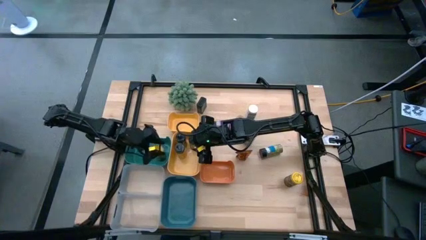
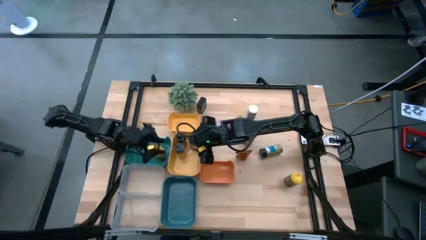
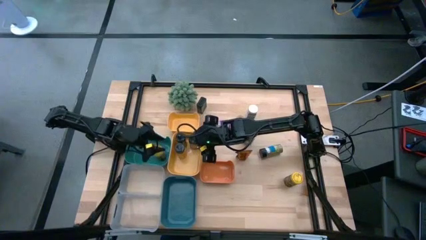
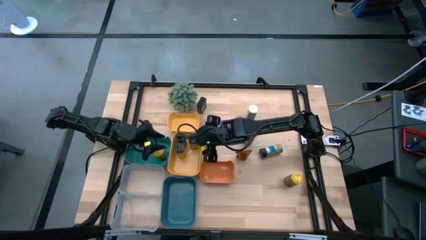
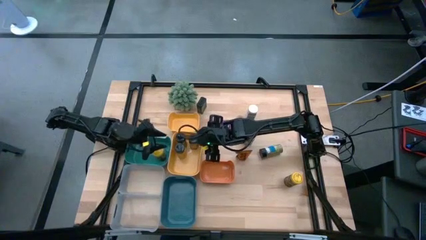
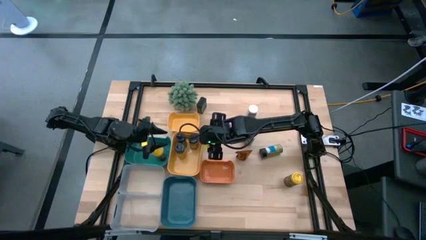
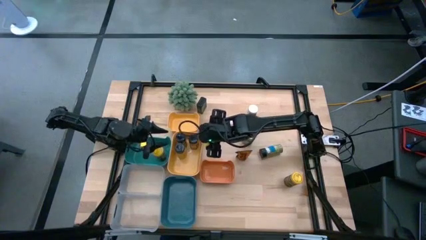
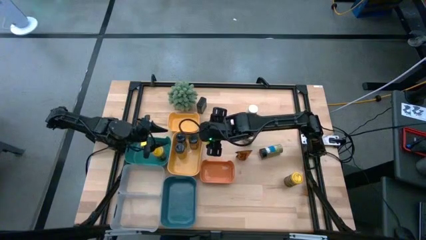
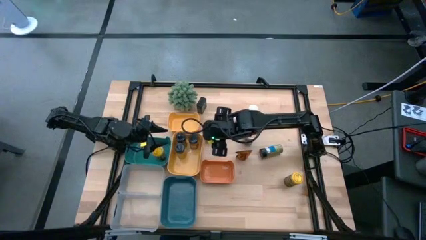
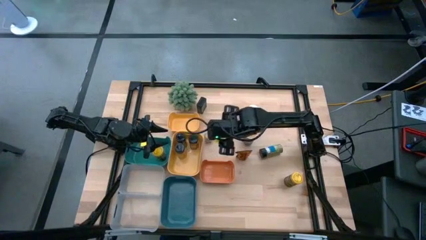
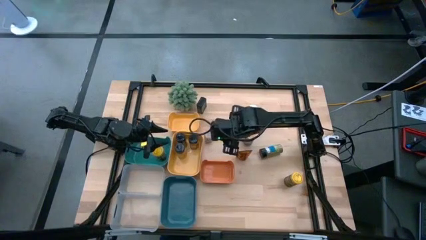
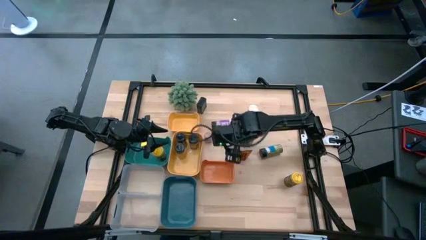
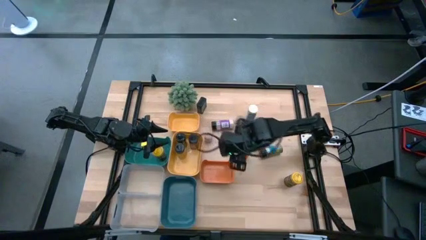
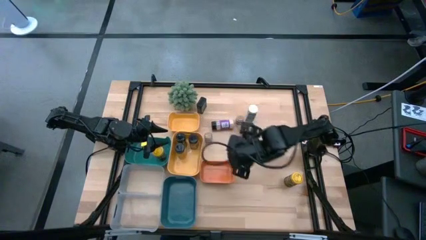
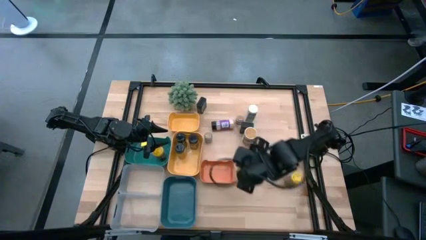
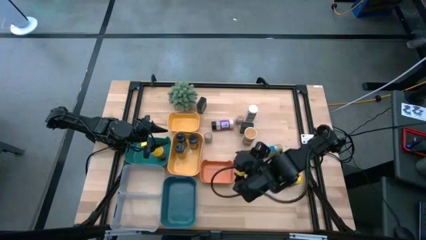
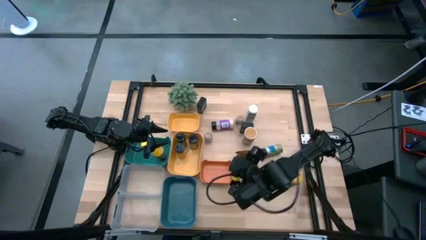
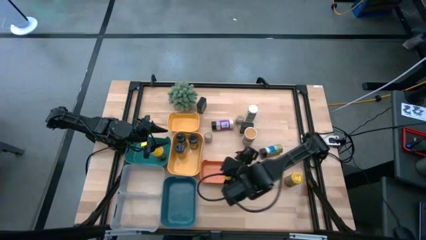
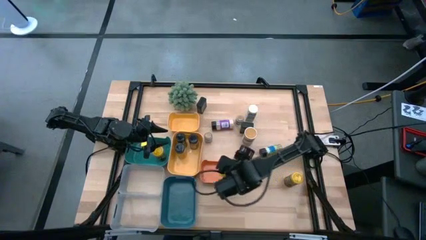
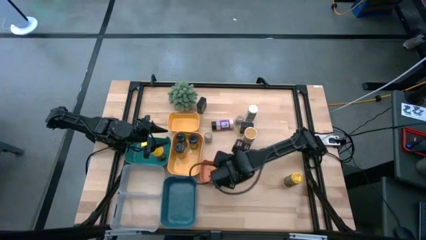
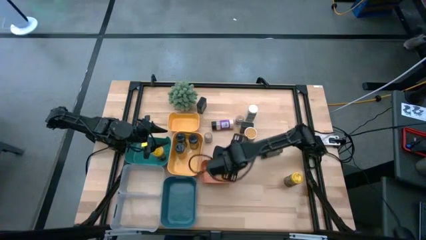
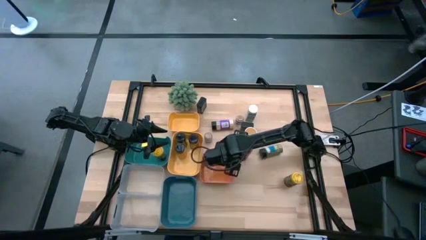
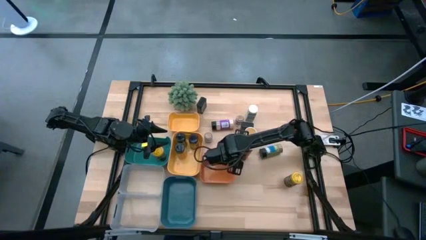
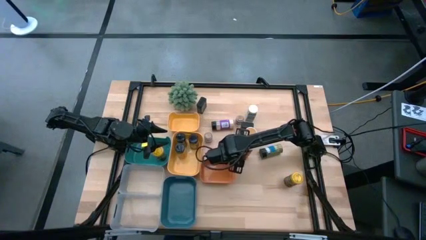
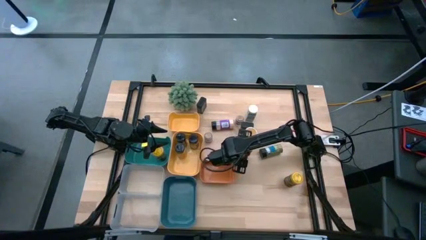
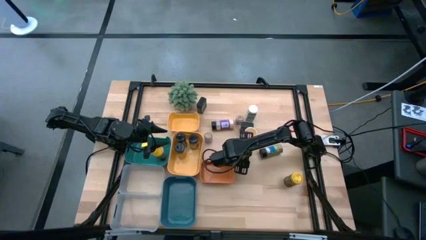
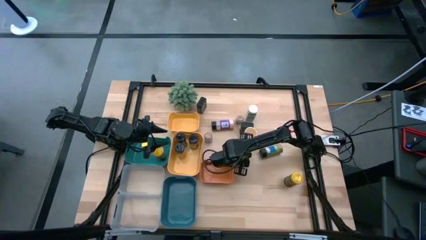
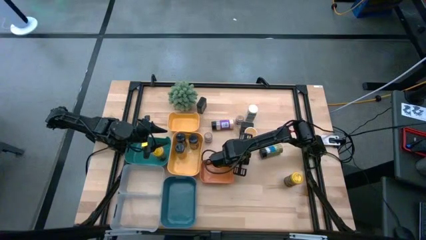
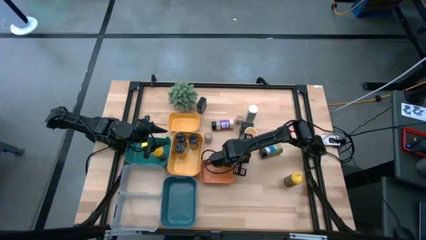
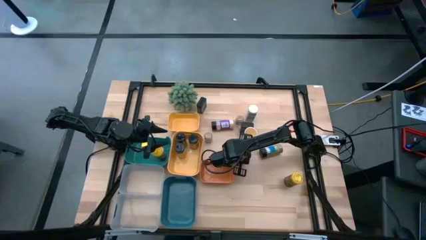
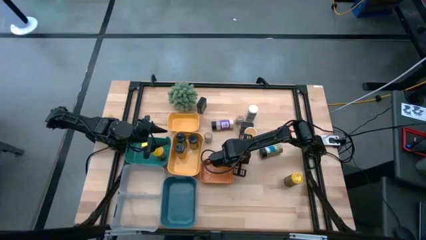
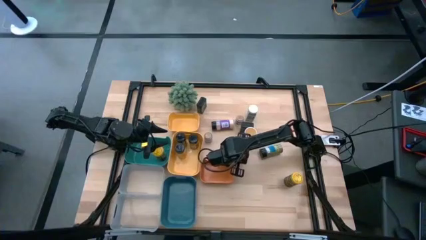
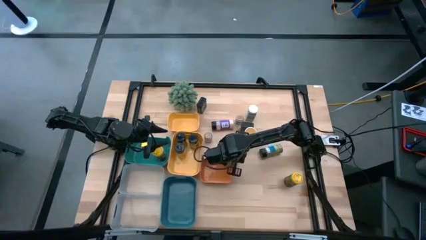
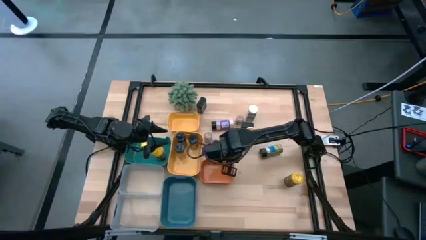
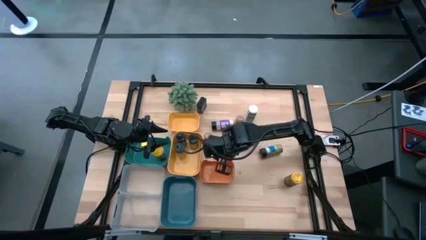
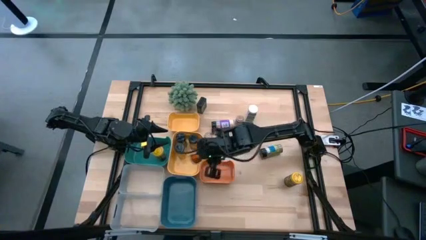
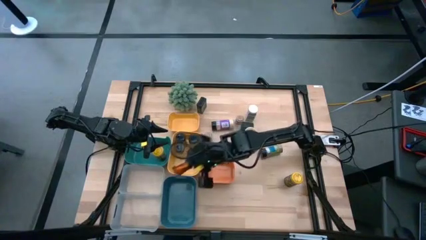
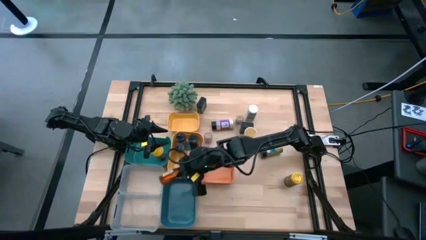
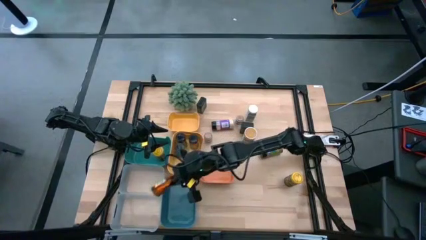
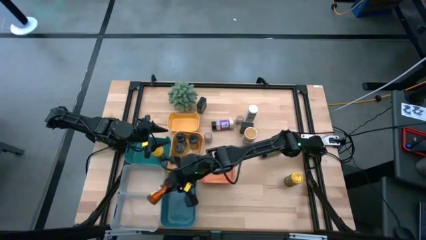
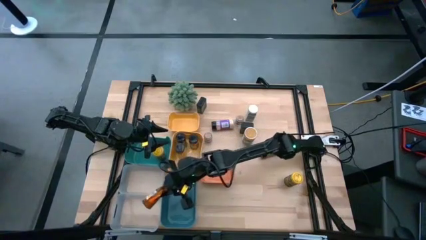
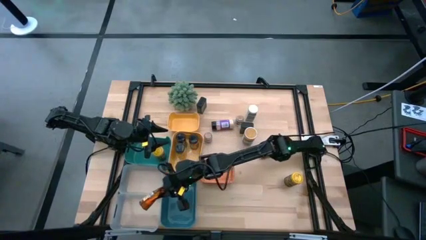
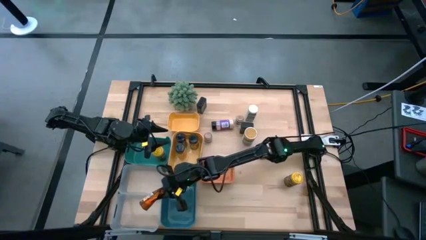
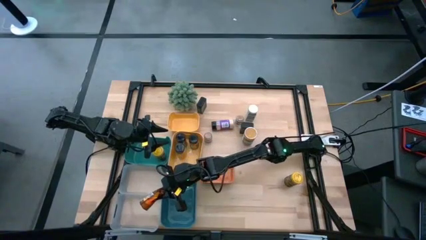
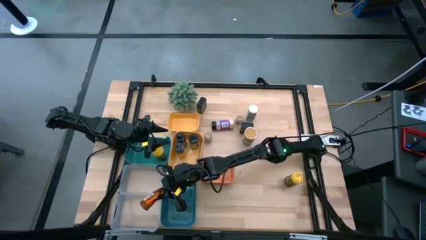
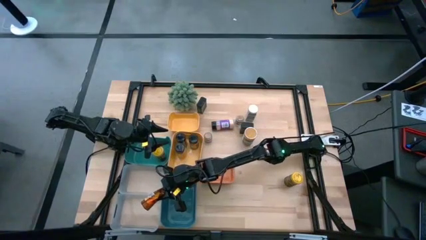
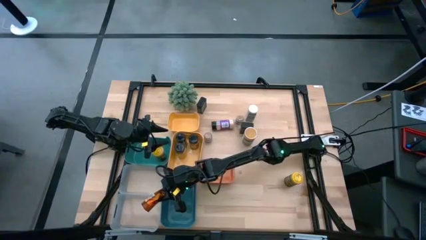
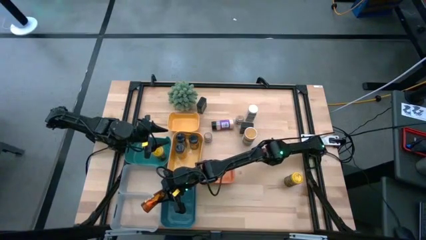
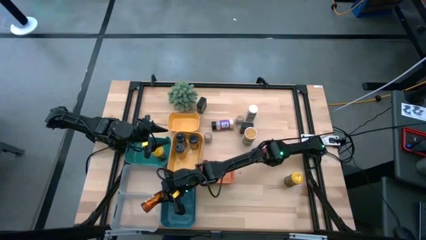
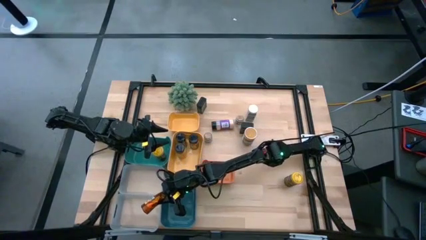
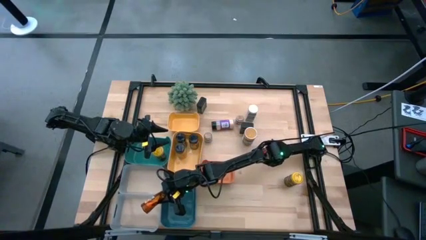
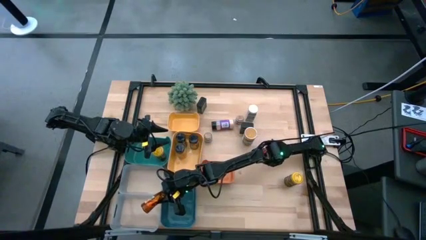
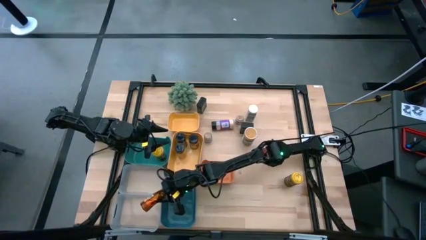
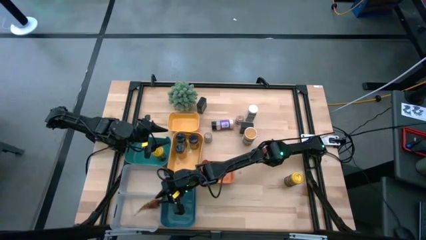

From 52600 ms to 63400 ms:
Task: Sort spices by type
Put the orange seasoning pack into the bottom transparent bin
